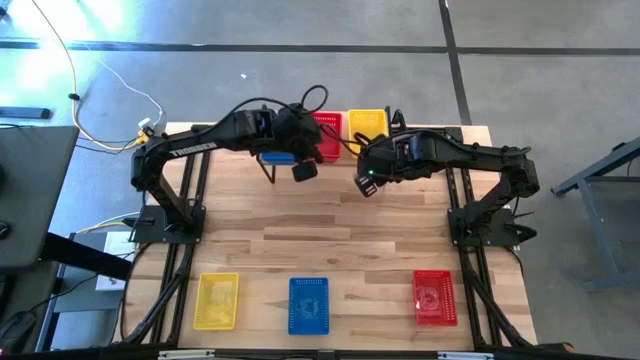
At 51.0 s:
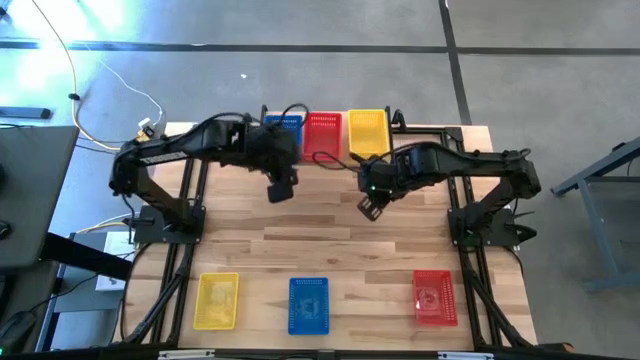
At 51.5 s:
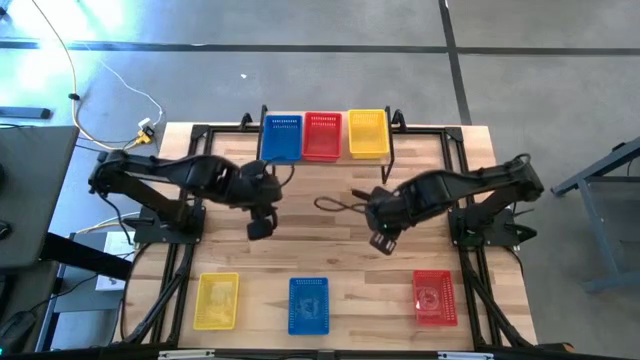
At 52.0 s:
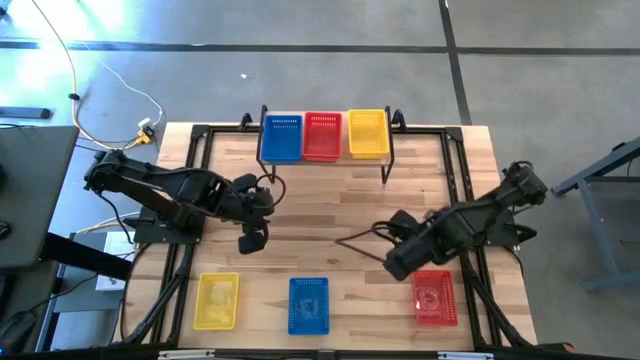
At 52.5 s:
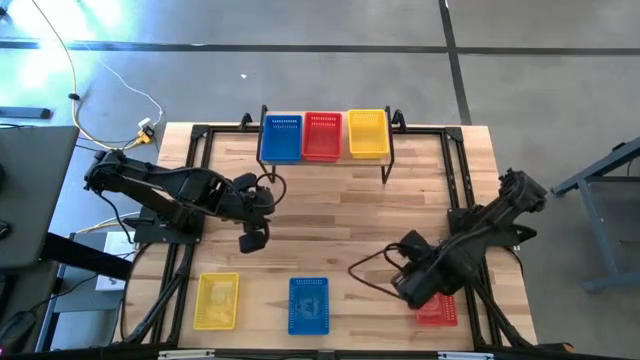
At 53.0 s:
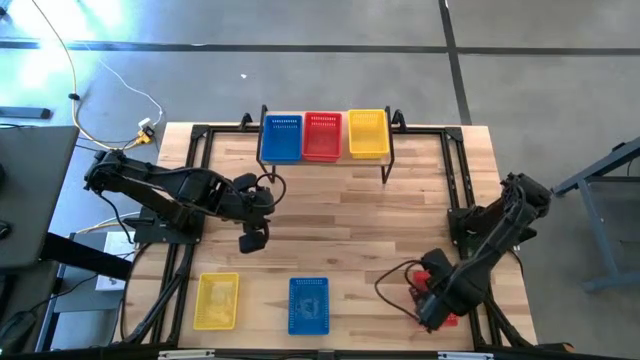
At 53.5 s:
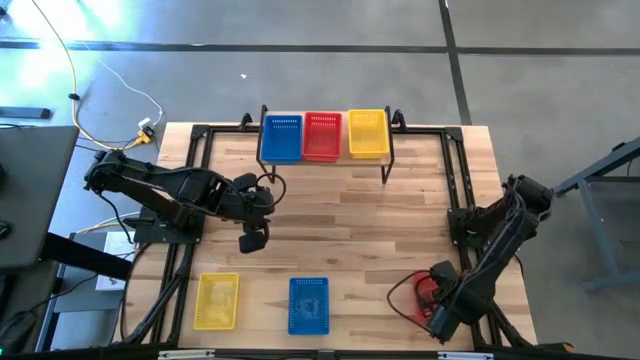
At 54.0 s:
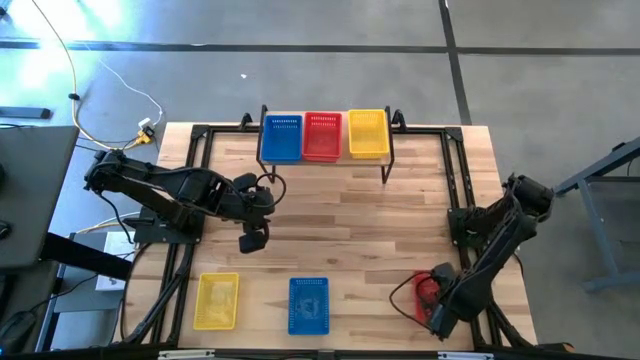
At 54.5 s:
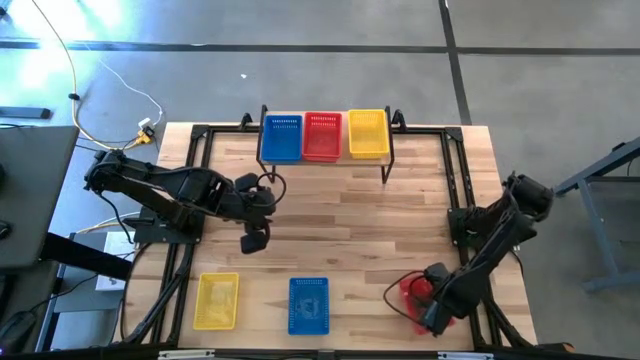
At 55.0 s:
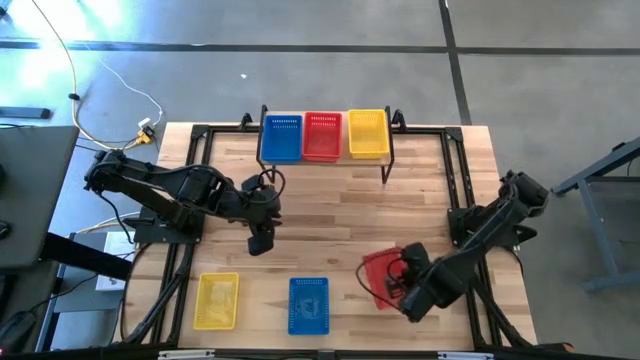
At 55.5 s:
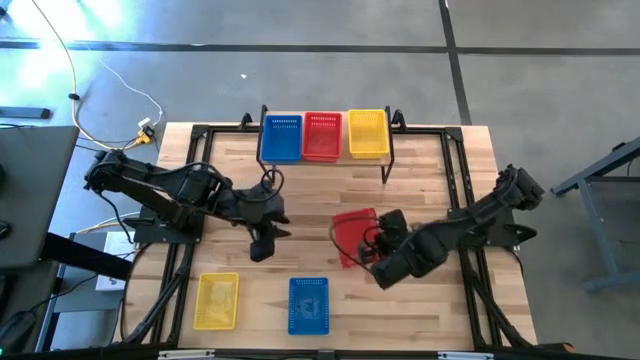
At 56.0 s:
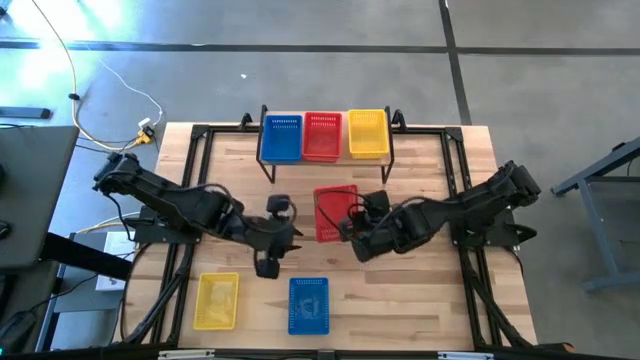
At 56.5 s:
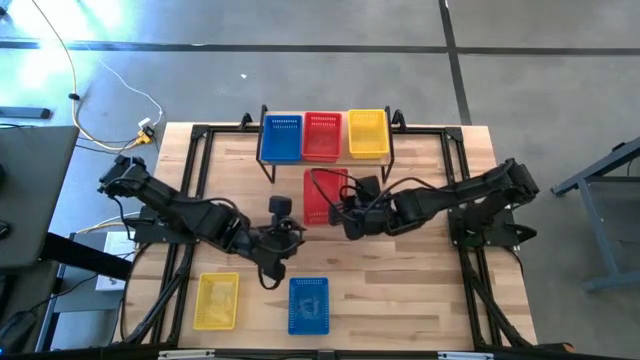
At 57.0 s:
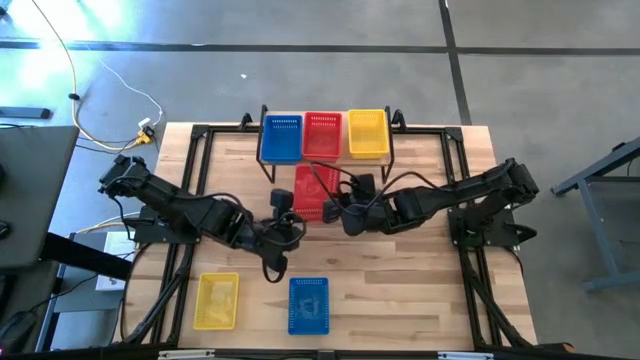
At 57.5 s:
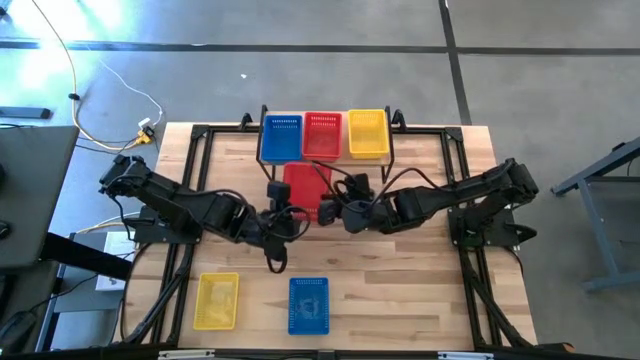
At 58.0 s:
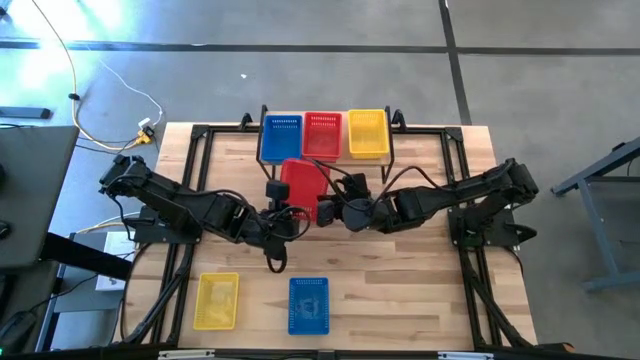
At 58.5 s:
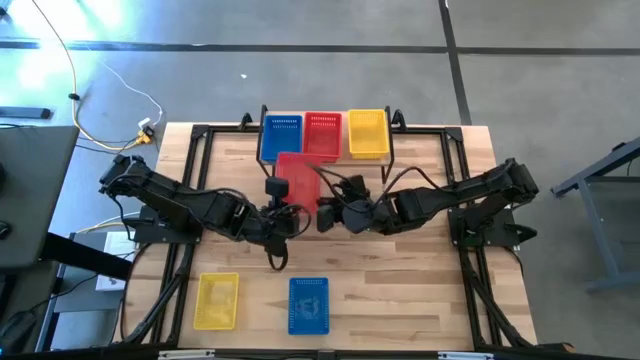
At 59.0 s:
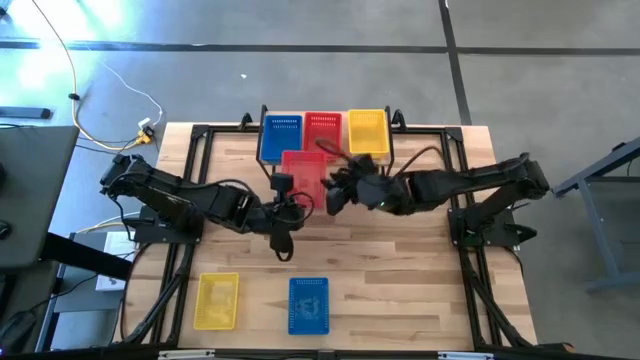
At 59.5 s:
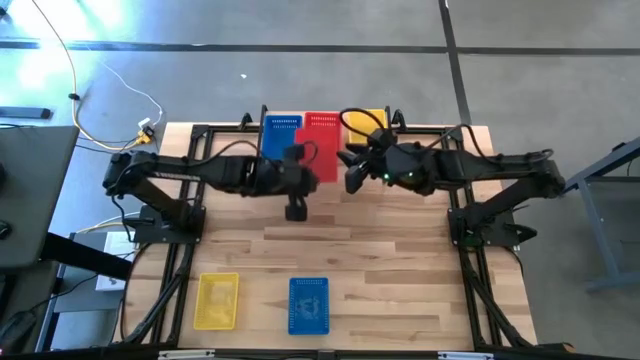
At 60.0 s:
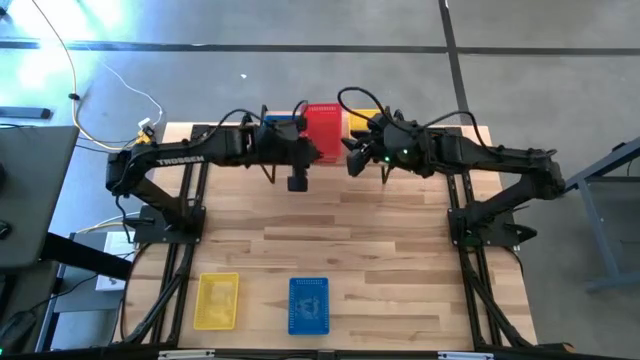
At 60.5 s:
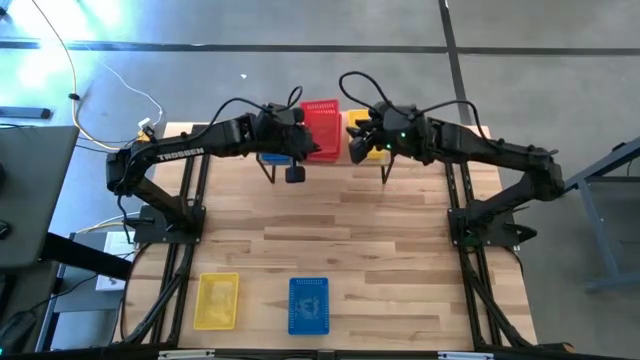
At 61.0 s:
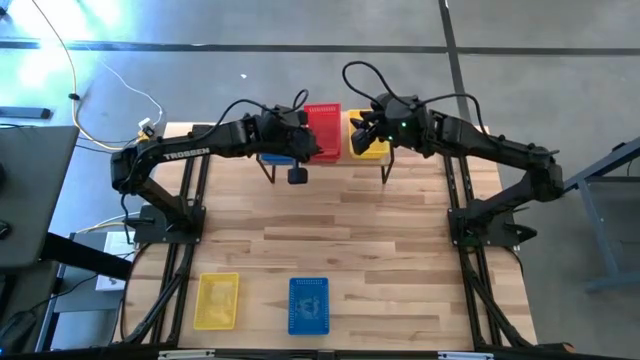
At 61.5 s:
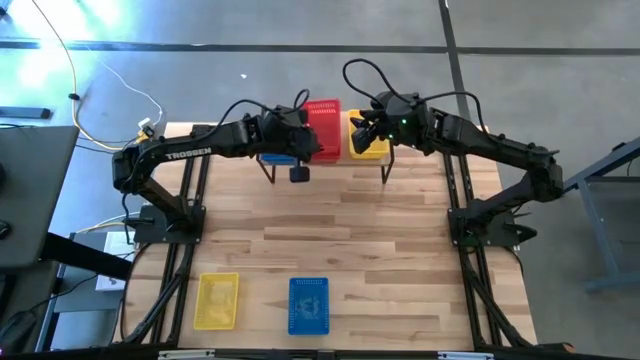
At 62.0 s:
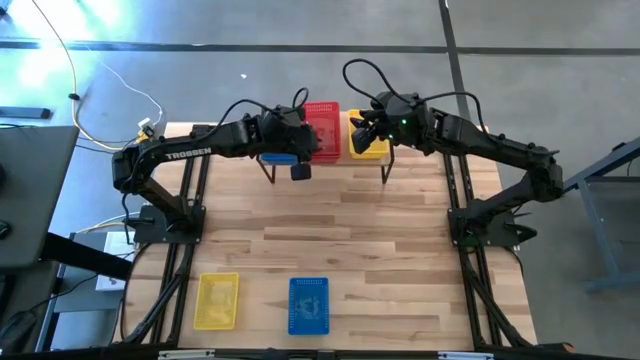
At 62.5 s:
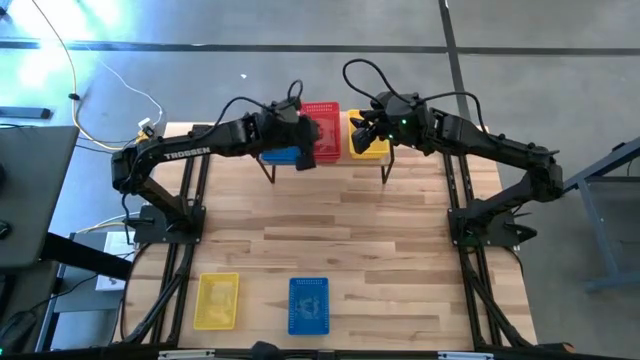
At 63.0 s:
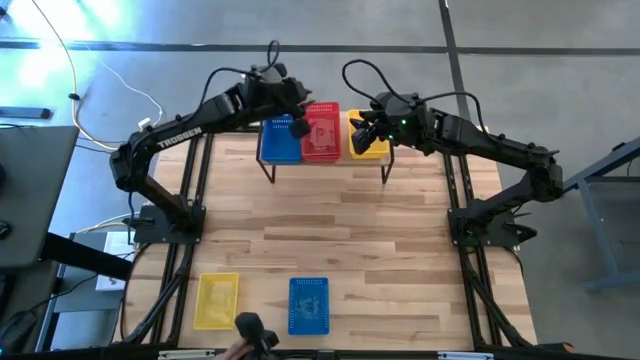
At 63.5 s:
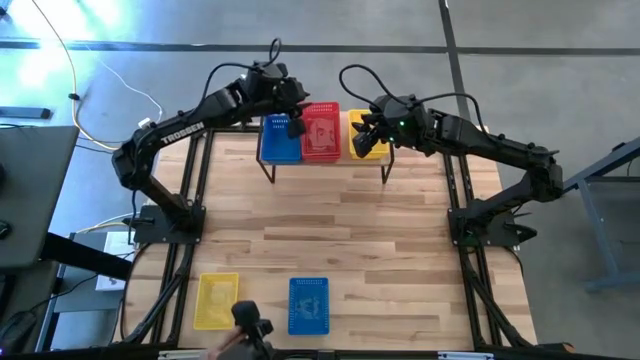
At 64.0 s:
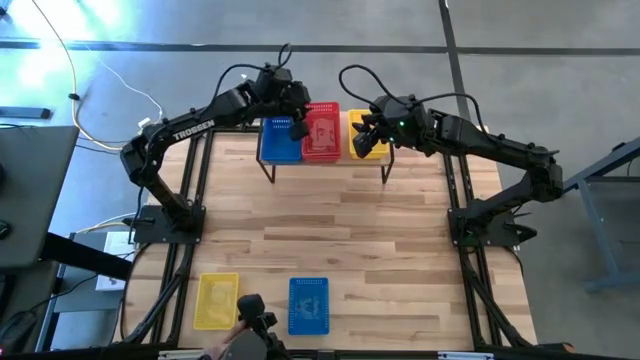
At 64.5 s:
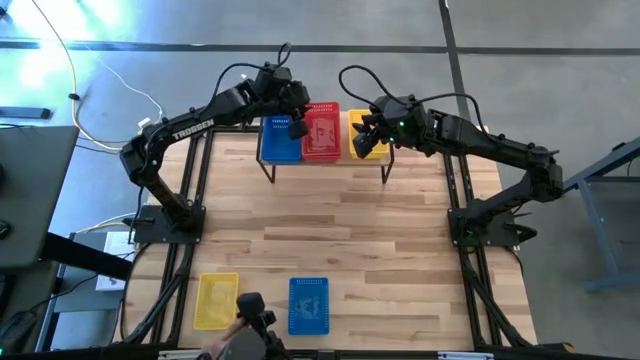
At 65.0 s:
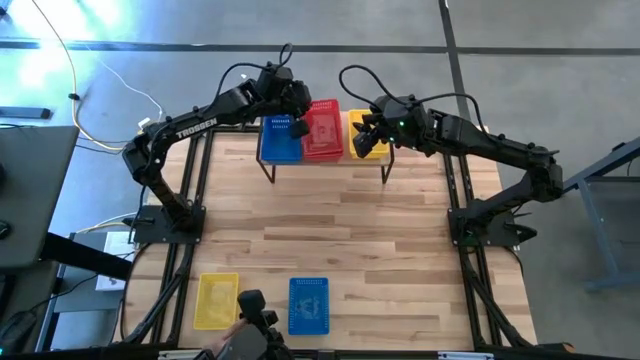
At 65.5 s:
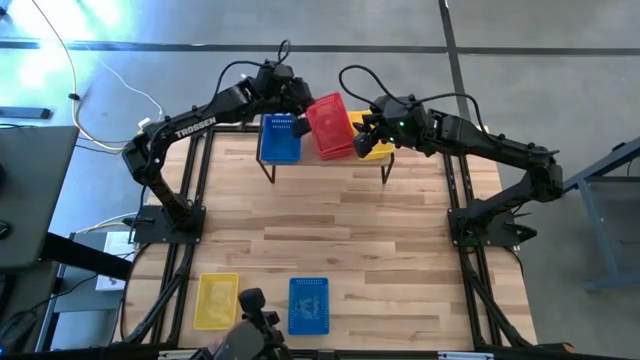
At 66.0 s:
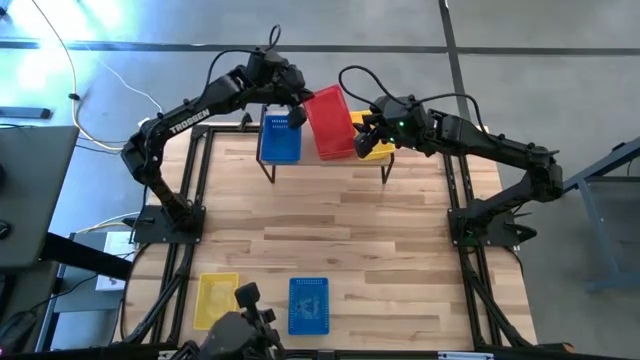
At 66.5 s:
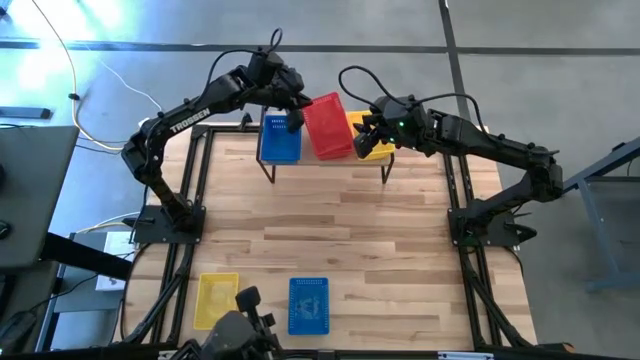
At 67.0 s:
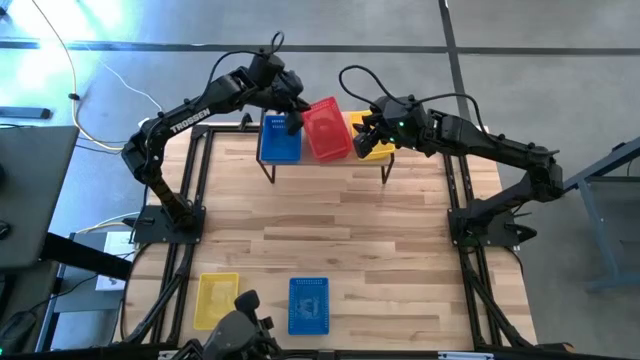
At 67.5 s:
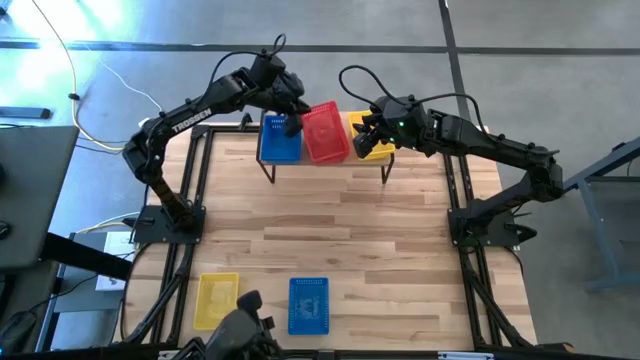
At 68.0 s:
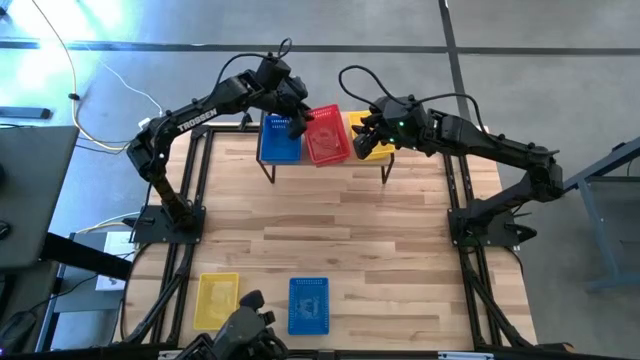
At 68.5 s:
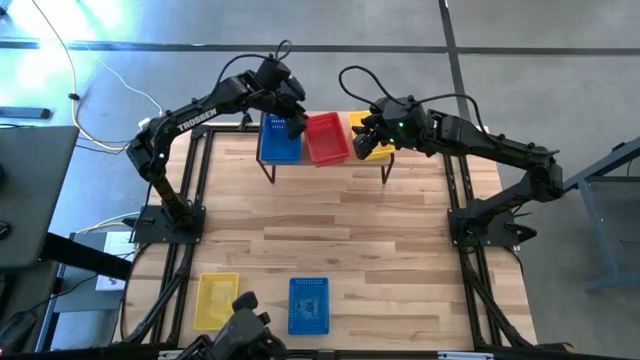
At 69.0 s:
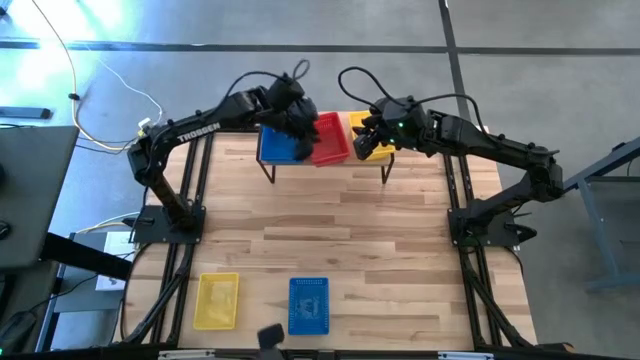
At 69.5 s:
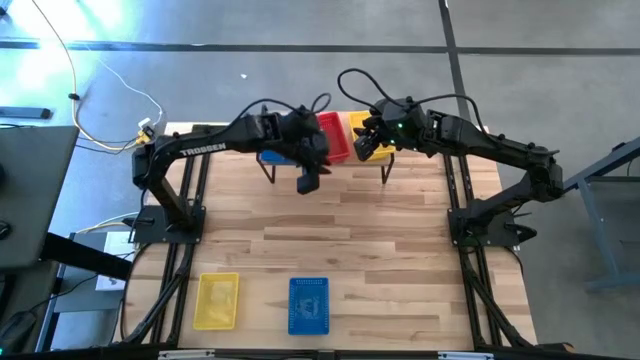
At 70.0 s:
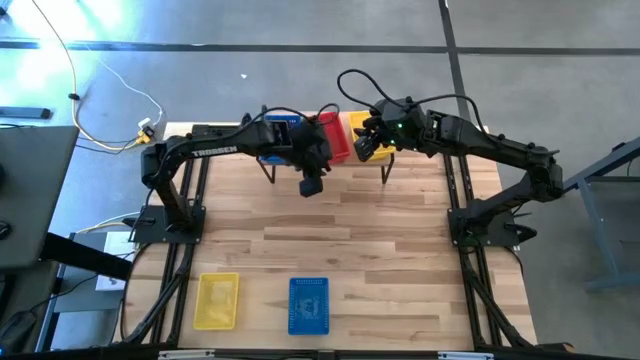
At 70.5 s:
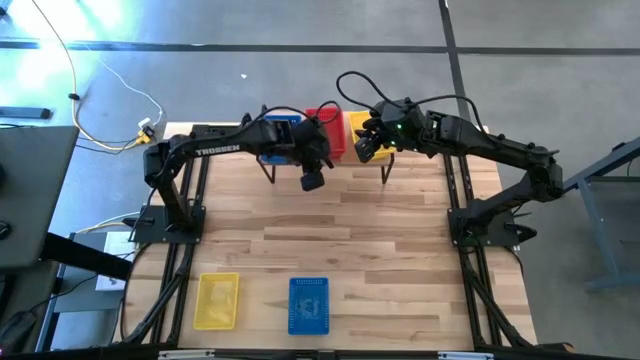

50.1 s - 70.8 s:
Task: Stack baskets on shelf by color
Stack the red basket on top of the red basket on the shelf
